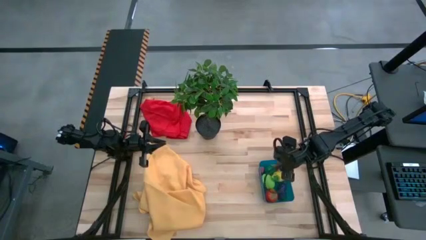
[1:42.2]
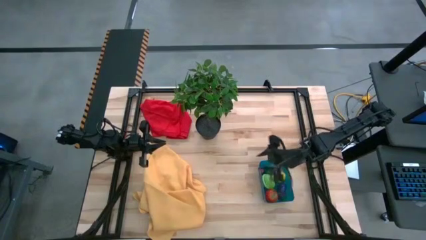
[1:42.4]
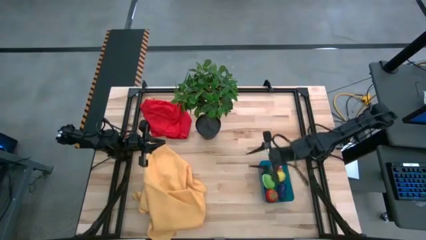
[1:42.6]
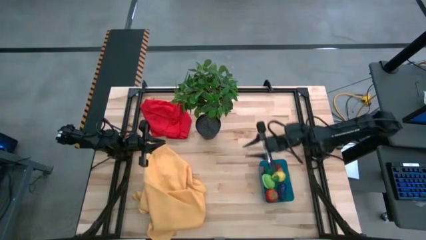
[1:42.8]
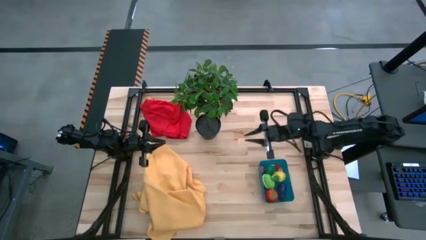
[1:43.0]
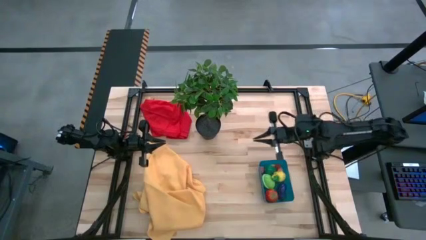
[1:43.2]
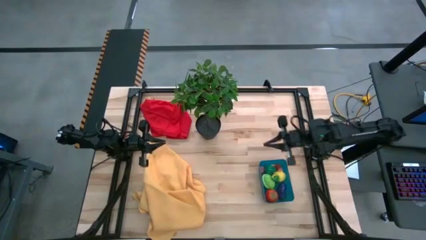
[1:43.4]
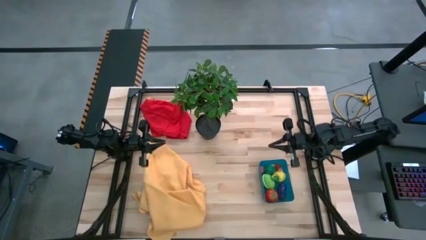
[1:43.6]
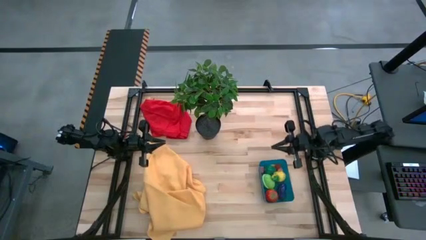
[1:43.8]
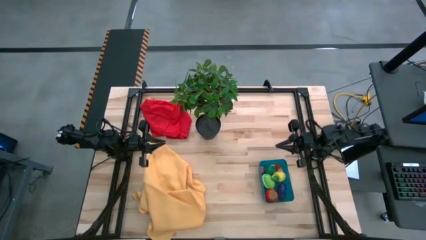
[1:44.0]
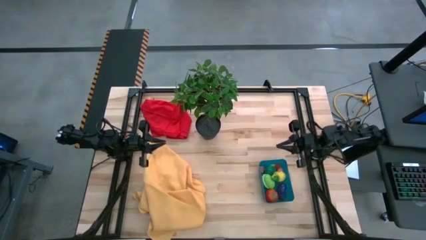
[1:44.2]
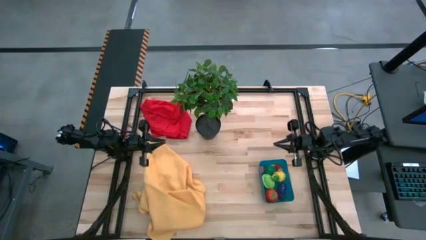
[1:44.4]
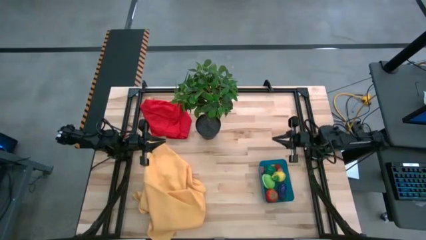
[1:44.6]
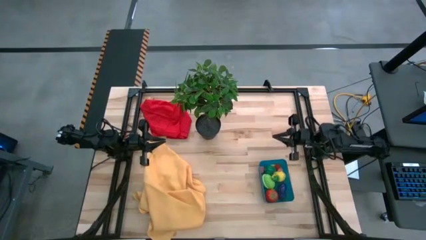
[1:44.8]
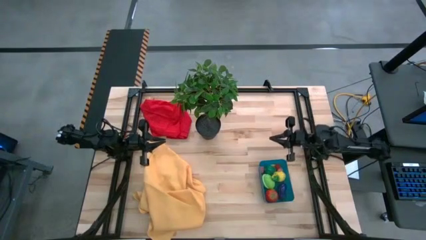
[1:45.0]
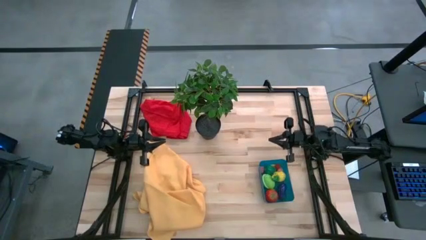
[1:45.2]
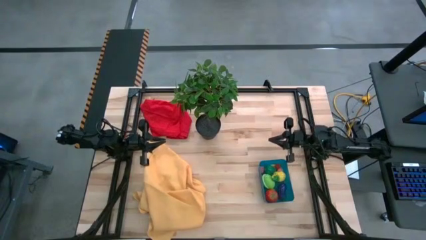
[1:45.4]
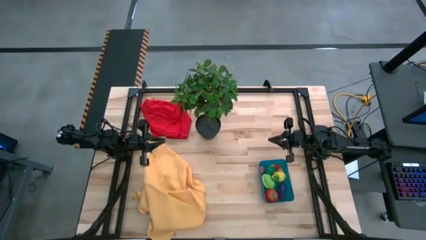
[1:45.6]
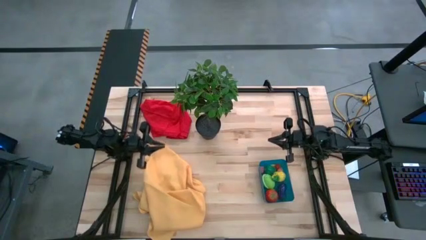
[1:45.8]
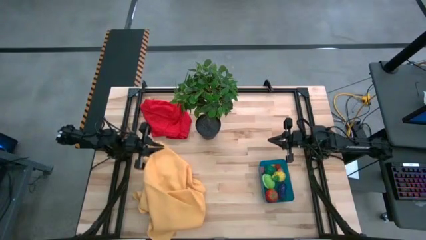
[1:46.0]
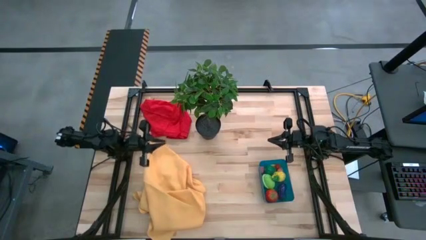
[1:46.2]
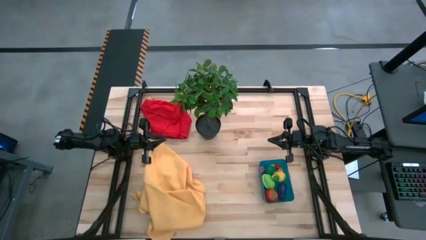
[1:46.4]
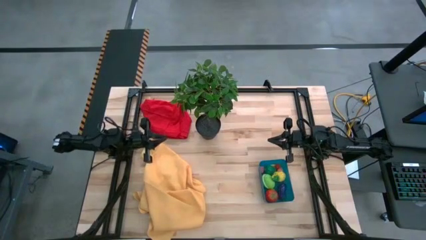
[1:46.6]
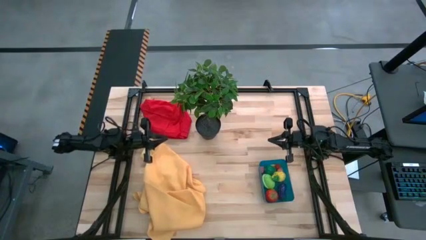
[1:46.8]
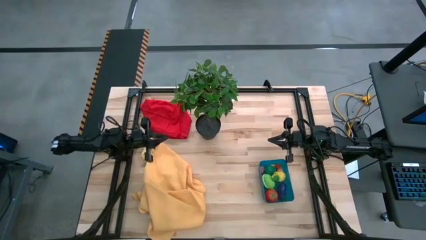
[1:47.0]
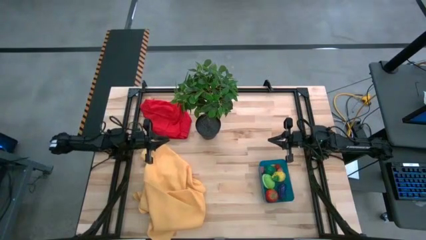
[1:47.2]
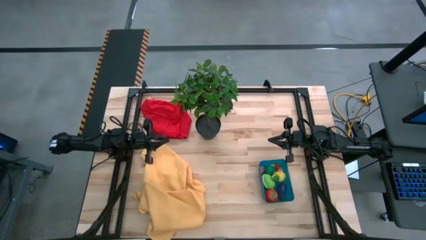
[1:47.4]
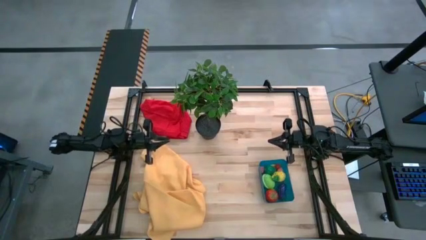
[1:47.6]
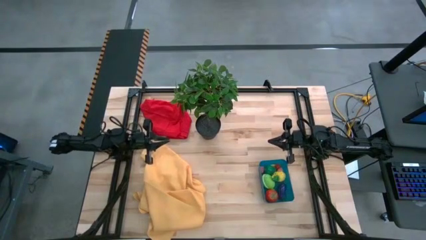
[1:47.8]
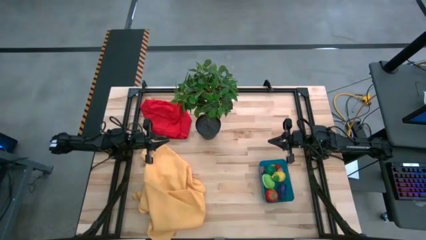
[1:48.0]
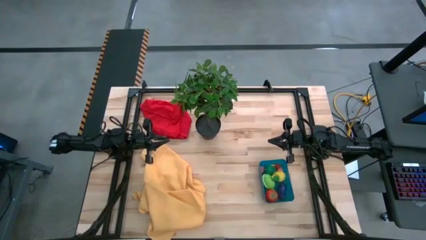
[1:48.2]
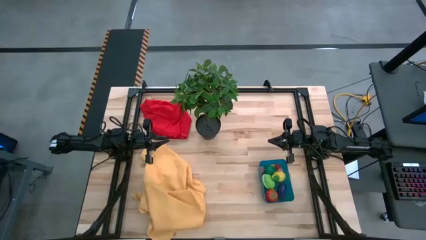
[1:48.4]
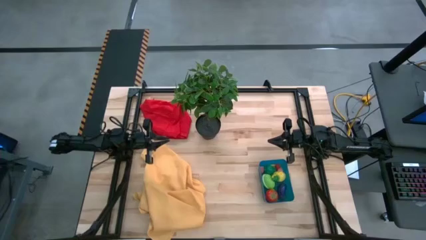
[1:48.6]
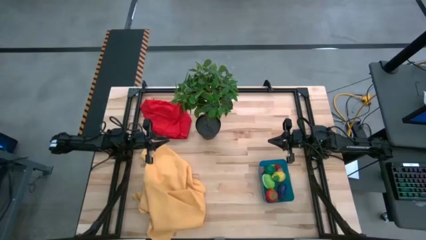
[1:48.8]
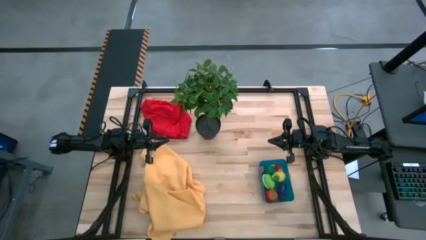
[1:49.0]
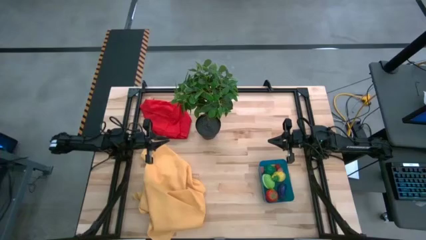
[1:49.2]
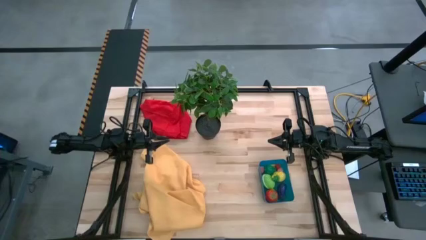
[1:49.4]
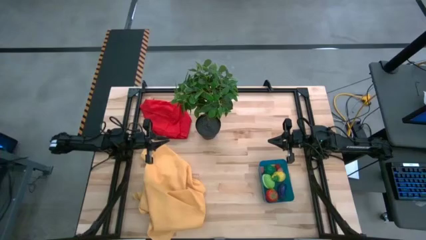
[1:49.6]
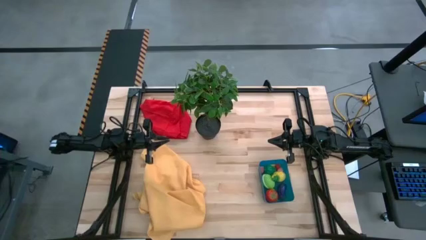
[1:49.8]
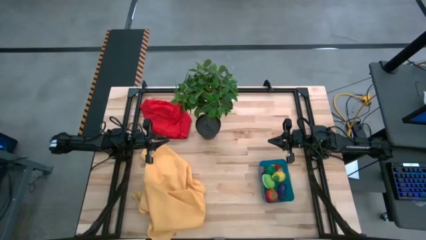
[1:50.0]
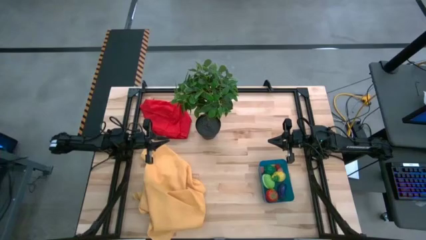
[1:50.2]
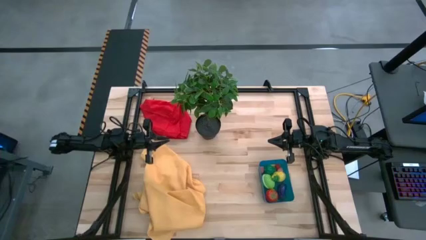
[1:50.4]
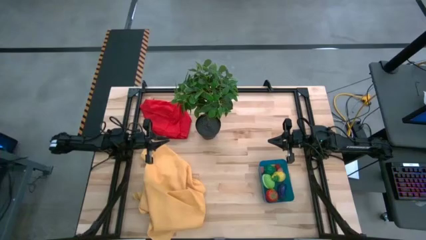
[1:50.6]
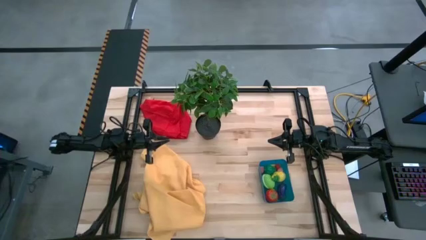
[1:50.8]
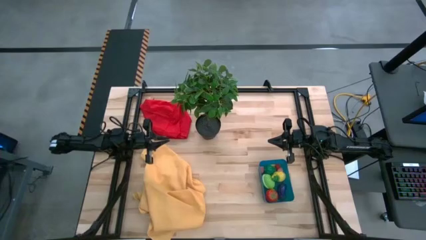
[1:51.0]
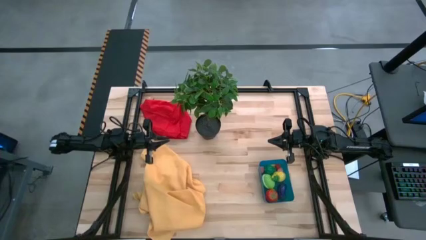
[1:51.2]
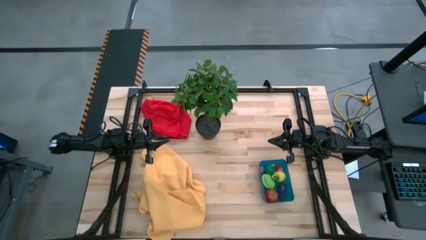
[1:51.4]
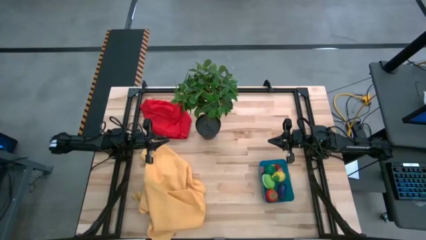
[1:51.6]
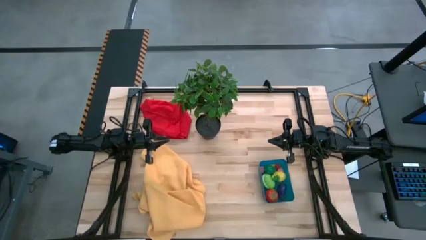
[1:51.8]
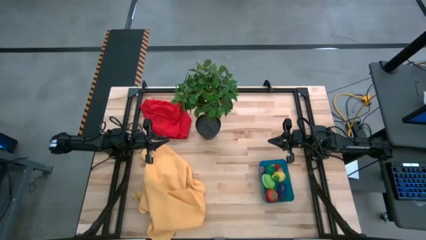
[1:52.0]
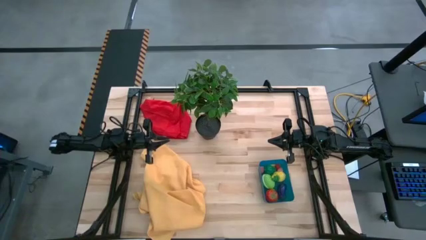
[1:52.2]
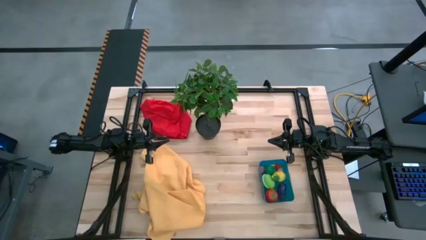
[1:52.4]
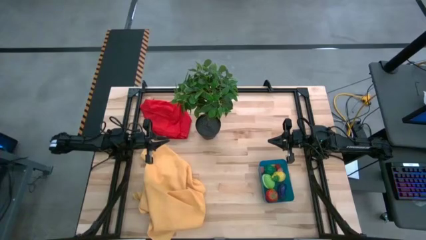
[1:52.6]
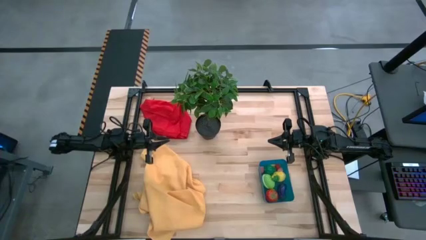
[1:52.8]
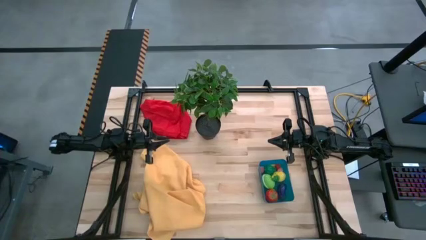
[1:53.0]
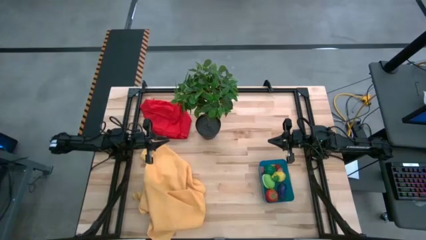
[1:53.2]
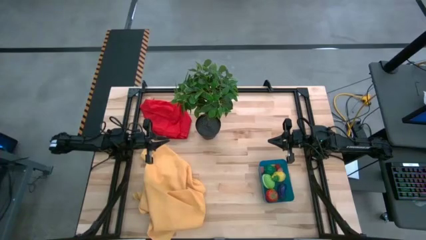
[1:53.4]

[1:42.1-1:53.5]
Task: Pick and placing Produce into tupperware
Return to Home Position

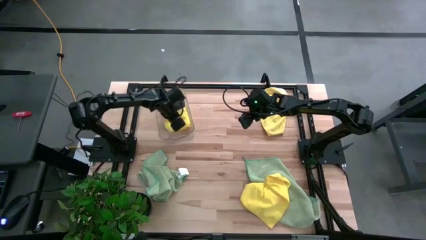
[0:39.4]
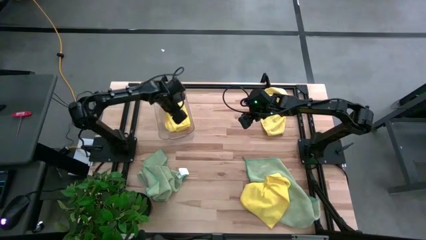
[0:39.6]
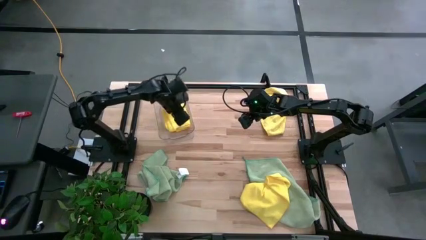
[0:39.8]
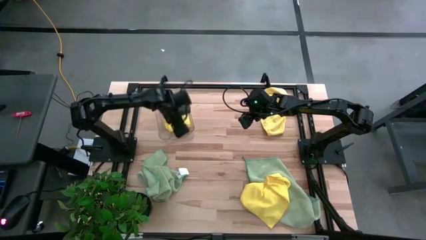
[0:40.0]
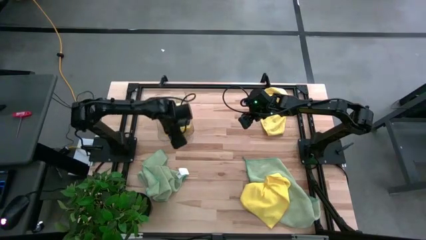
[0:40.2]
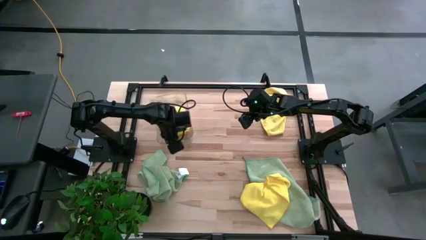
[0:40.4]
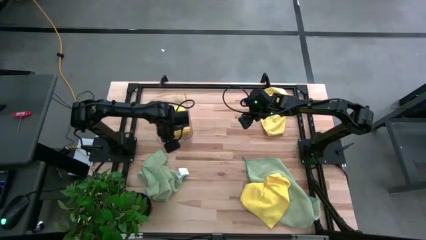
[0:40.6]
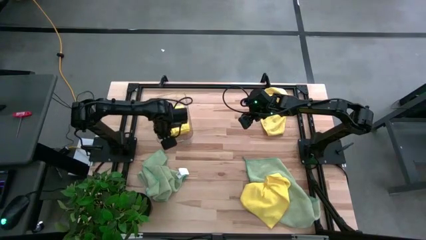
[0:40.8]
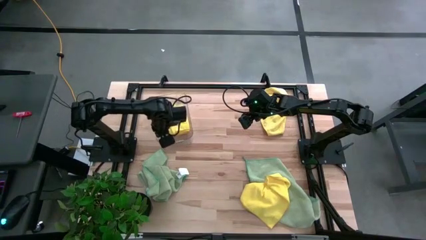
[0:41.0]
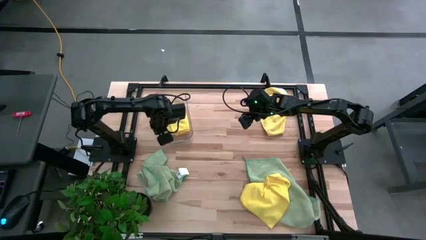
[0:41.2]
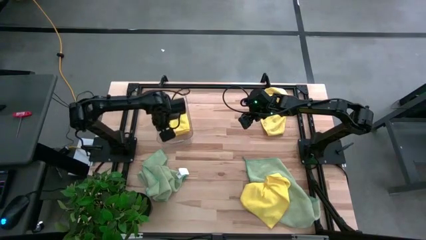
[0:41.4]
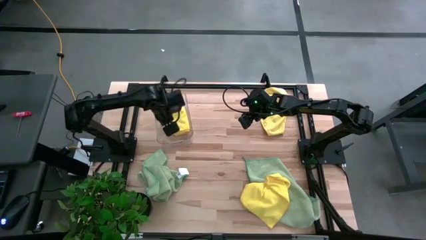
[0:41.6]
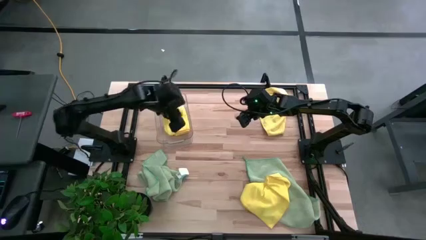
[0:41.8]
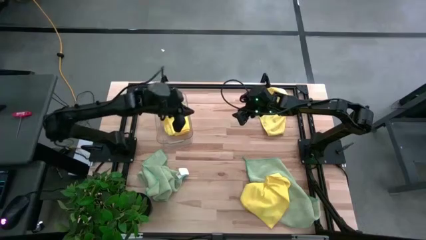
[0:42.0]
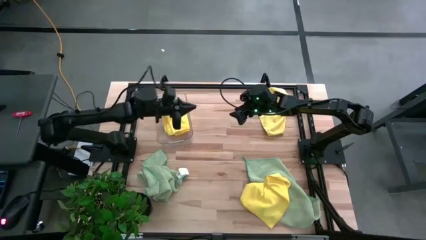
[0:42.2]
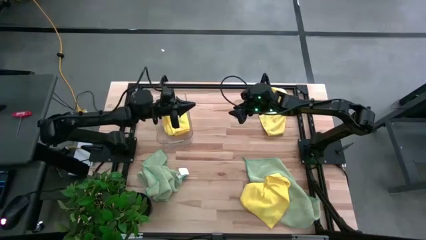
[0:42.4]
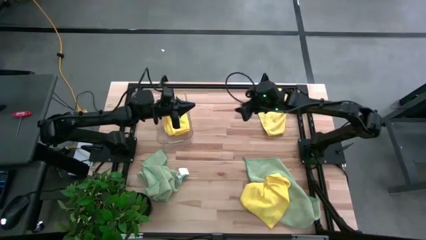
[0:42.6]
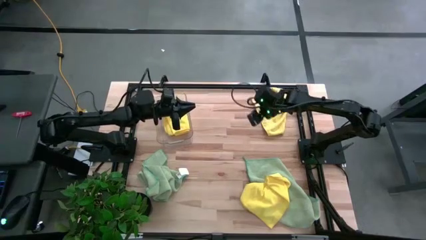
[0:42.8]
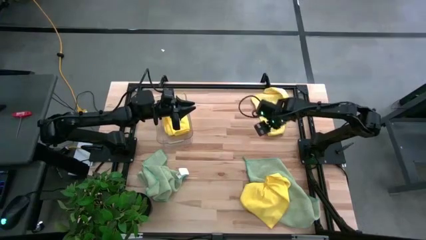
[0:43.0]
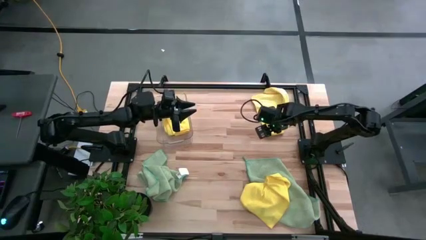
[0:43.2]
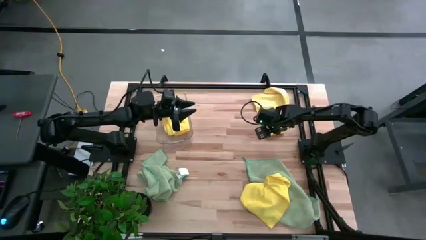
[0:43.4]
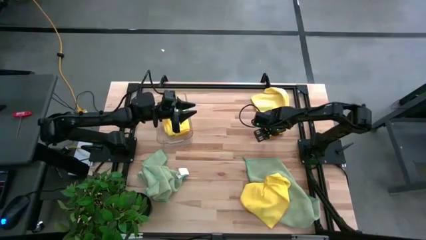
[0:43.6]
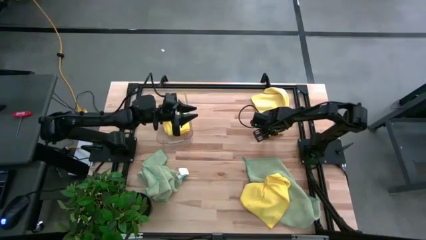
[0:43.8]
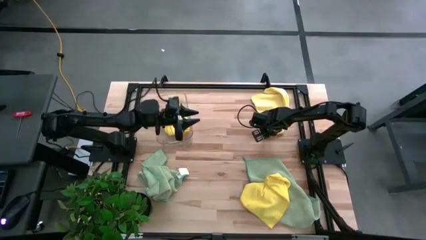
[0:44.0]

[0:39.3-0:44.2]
Task: Fold microfiber towels
Fold the top yellow towel
